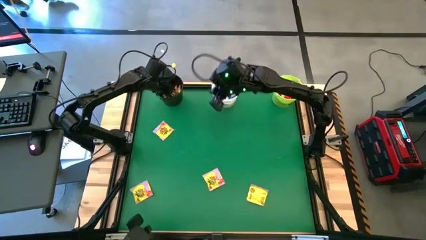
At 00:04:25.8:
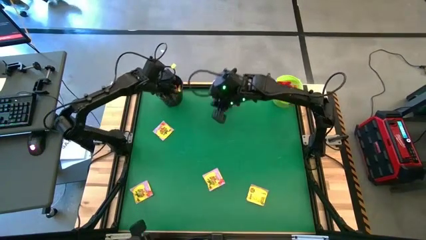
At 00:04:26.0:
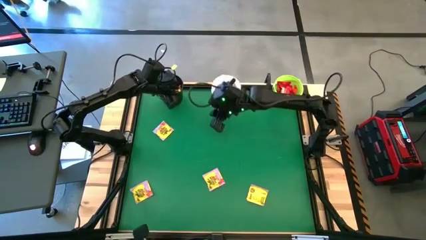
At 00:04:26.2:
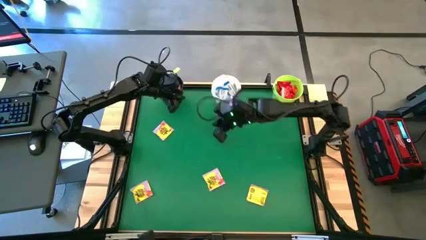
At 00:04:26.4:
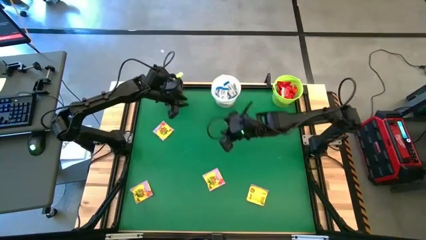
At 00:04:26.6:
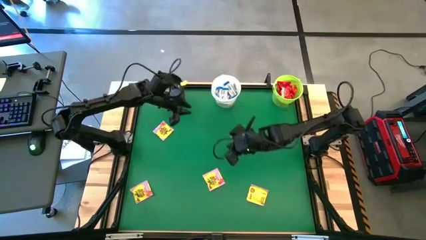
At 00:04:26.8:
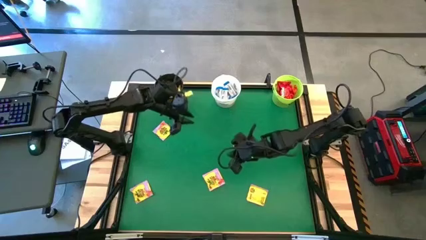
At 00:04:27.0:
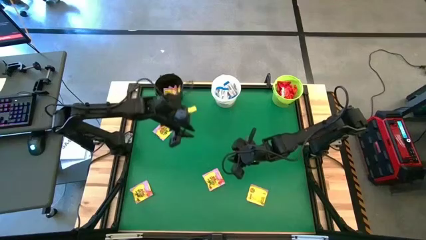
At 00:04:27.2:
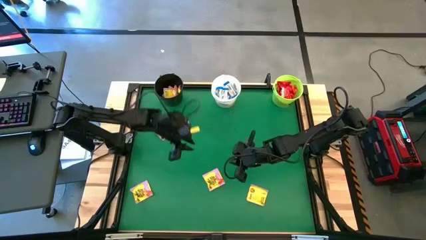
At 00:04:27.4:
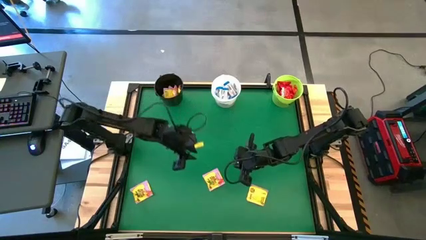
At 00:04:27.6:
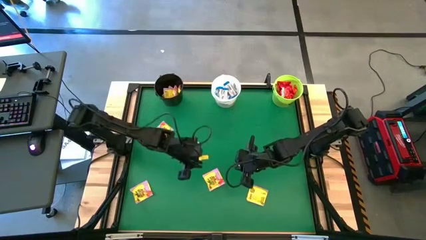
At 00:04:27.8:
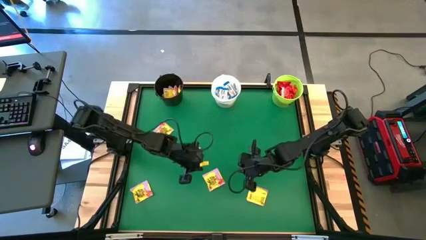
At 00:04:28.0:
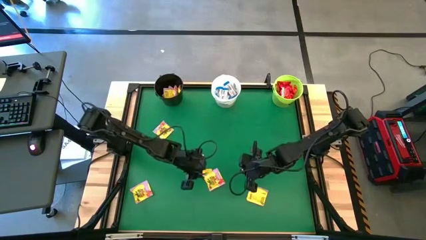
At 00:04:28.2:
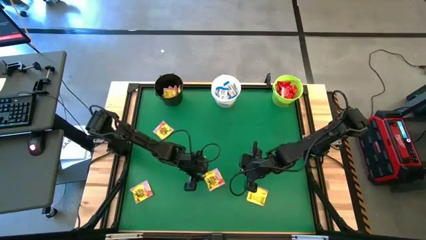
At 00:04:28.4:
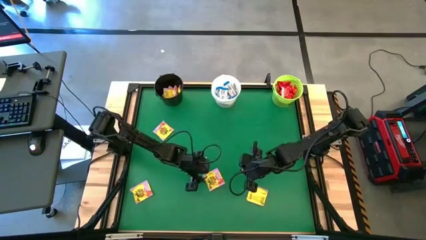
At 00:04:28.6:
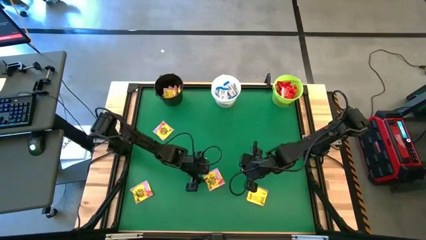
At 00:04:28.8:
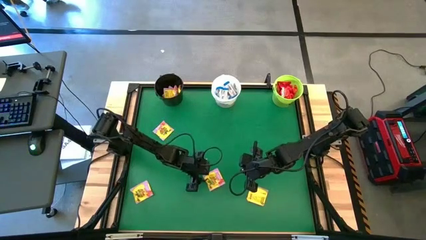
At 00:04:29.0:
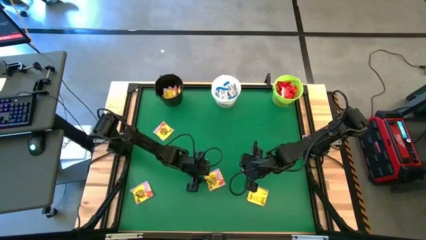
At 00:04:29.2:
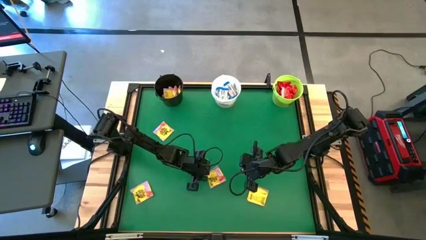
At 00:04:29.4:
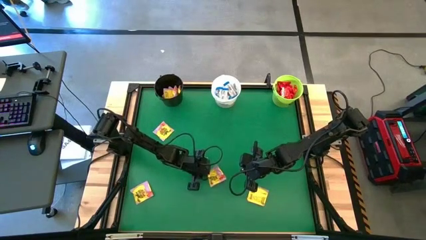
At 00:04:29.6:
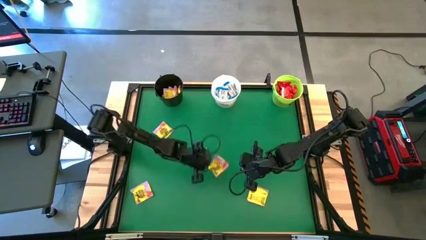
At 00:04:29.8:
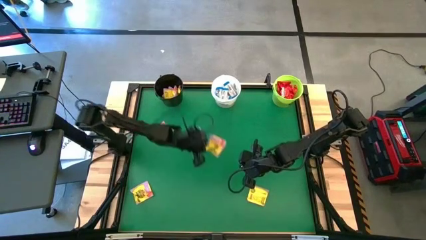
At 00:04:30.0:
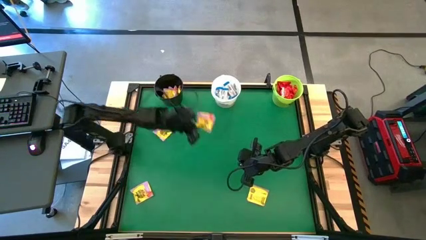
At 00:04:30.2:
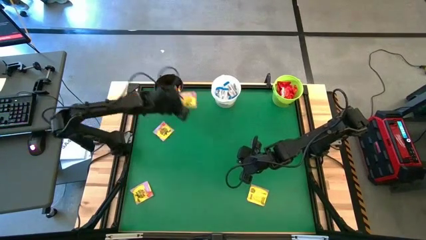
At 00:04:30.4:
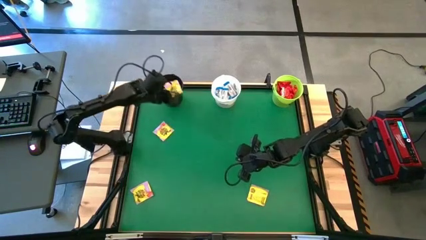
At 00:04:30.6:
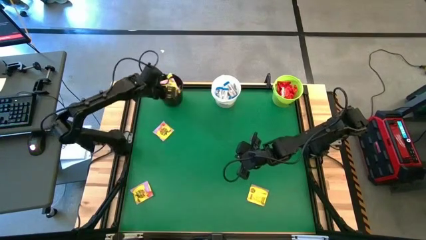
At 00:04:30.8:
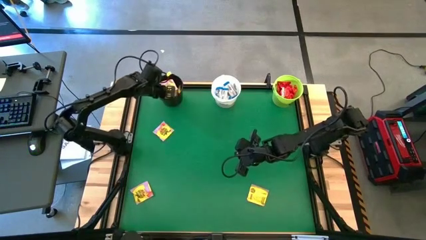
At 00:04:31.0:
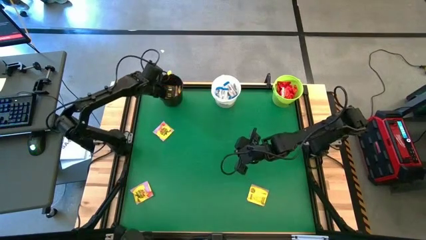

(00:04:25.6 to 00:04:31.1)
Task: Sort candy by brand, put in halloween buckets
Put the yellow candy into the black bucket

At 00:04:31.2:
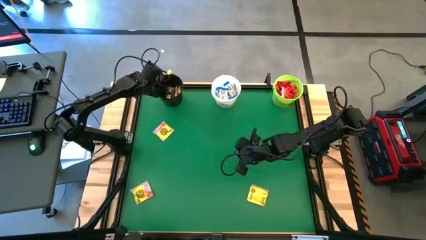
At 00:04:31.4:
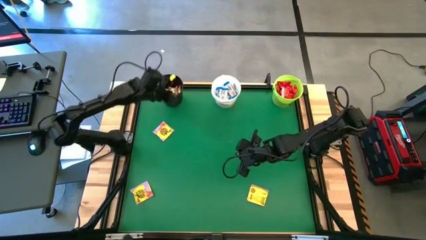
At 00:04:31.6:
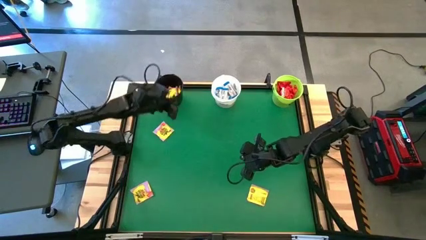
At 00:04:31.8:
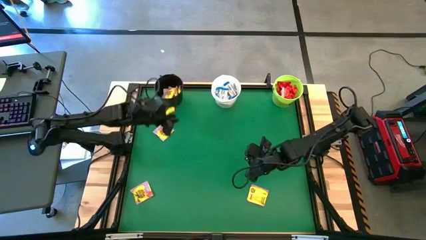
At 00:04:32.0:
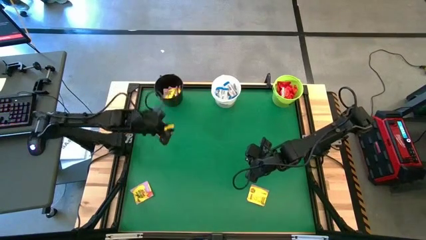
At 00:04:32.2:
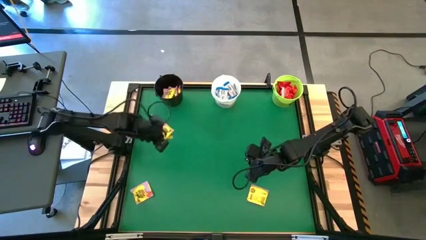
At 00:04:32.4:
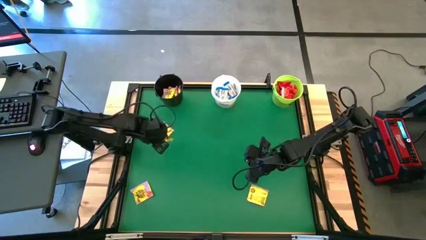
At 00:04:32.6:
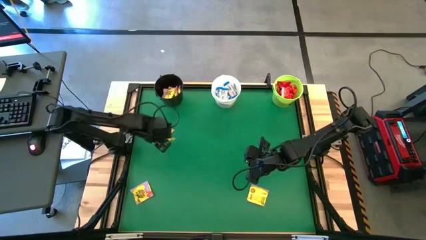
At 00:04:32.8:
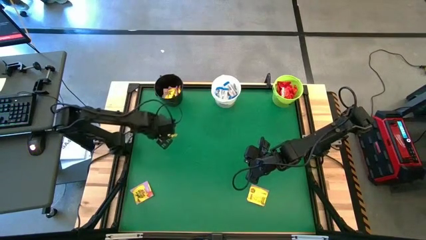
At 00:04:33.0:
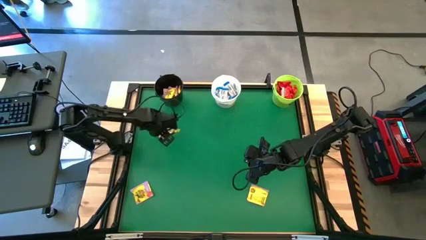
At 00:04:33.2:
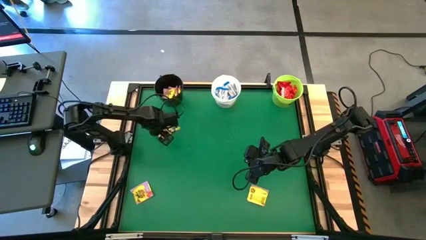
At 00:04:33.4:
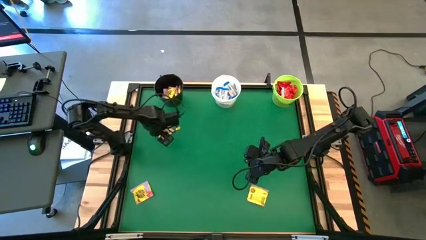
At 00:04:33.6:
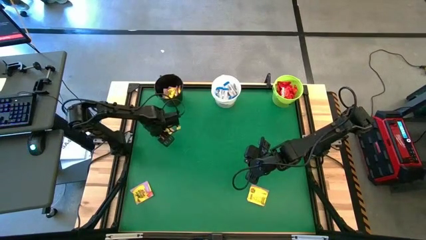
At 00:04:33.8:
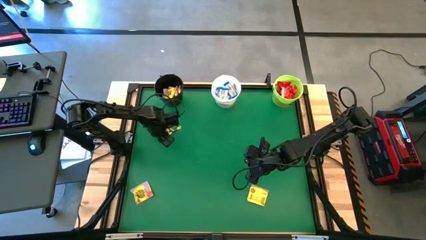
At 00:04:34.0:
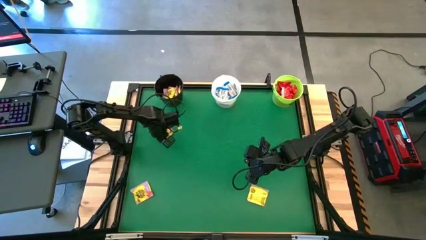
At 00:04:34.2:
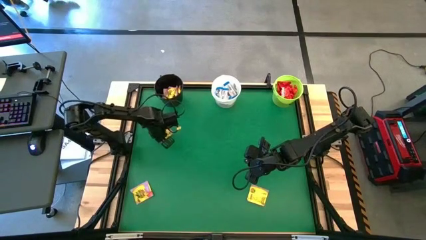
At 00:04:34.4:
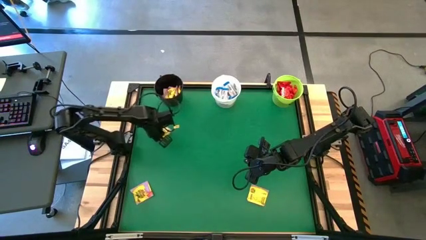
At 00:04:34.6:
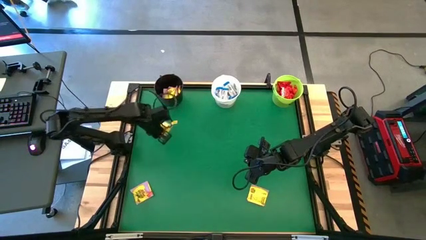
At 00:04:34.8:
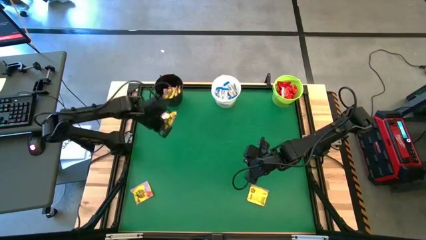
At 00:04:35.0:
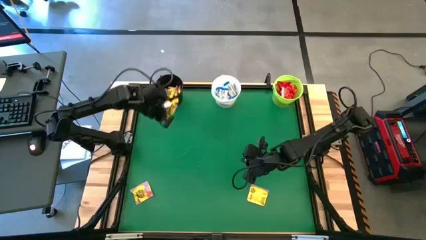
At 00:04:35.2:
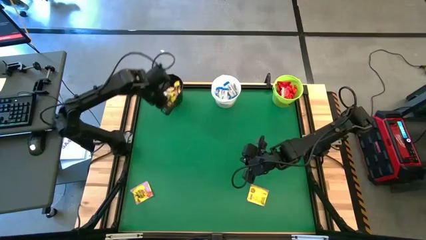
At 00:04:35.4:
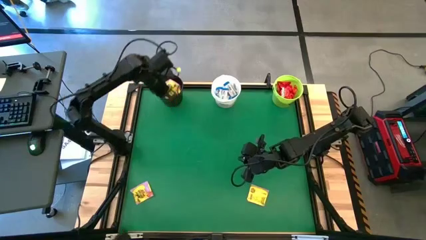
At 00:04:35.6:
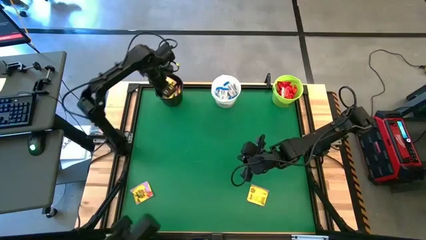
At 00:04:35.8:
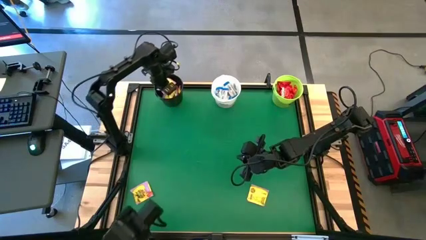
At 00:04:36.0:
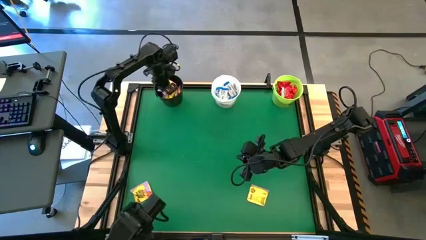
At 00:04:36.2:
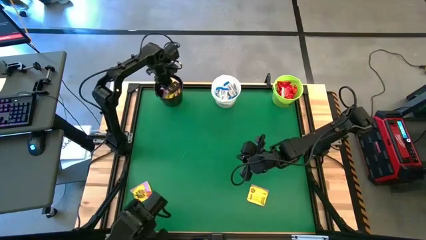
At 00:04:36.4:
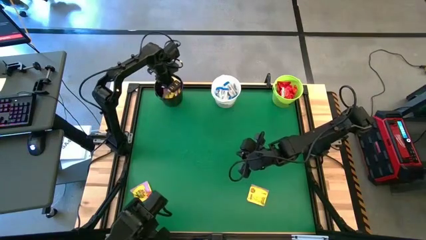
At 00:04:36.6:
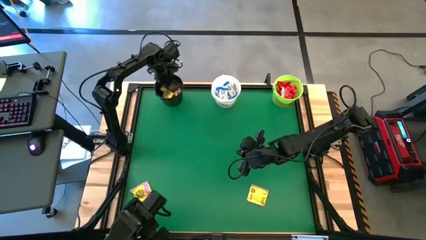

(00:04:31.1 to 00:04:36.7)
Put the yellow candy into the black bucket

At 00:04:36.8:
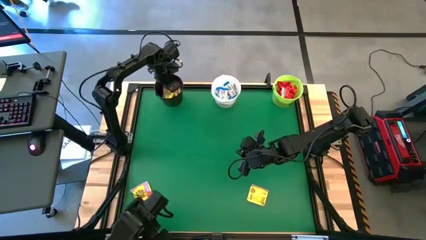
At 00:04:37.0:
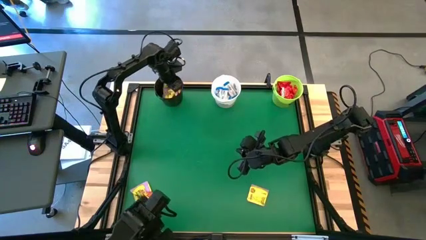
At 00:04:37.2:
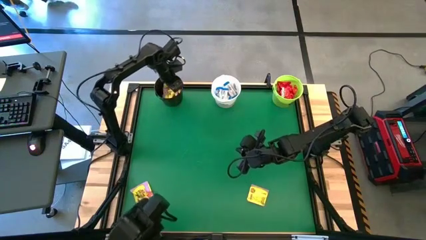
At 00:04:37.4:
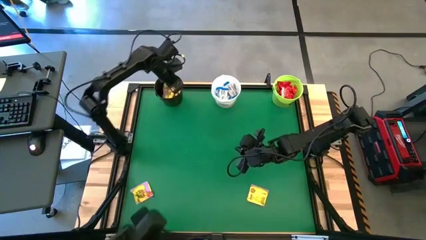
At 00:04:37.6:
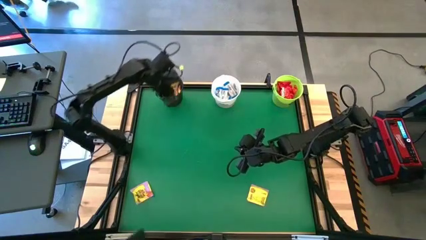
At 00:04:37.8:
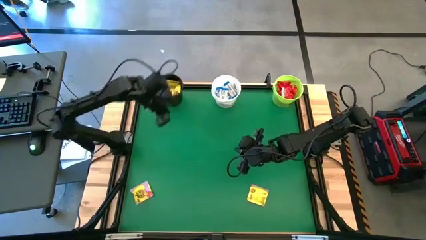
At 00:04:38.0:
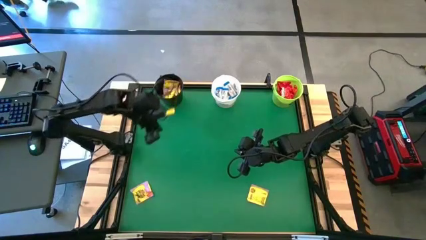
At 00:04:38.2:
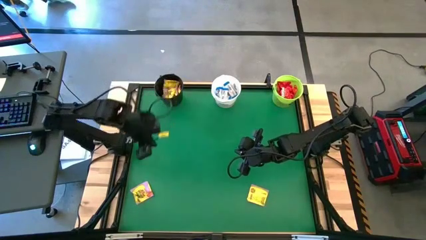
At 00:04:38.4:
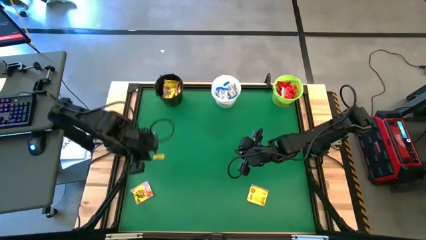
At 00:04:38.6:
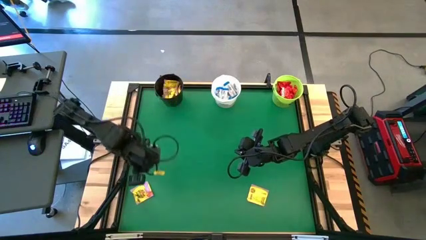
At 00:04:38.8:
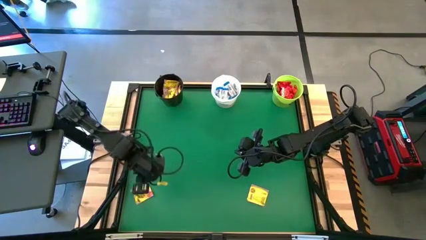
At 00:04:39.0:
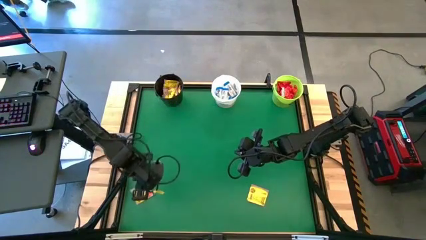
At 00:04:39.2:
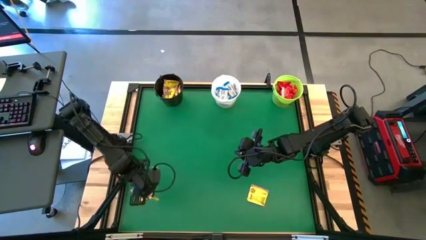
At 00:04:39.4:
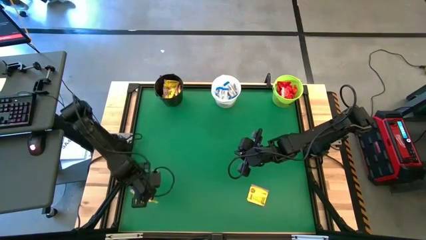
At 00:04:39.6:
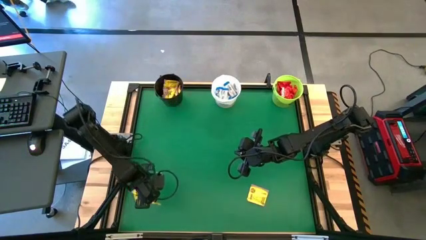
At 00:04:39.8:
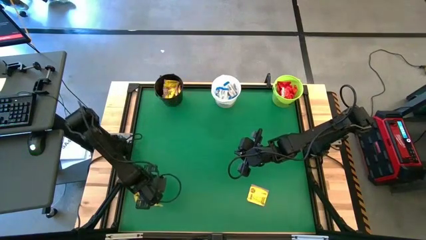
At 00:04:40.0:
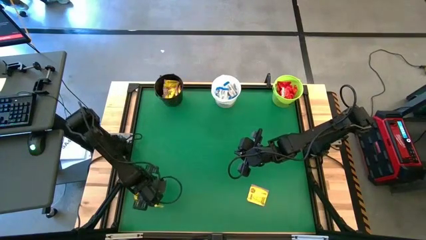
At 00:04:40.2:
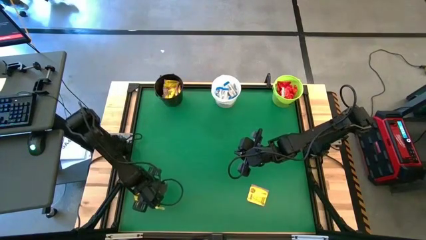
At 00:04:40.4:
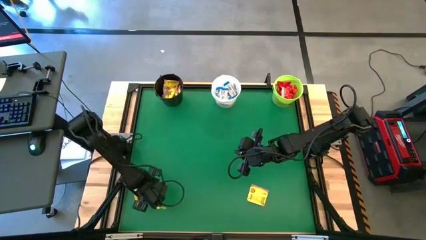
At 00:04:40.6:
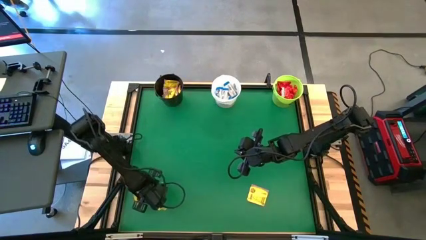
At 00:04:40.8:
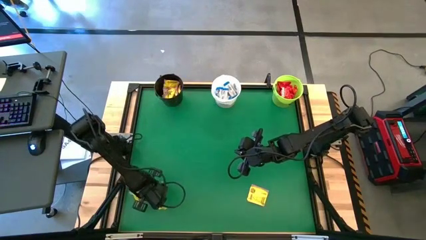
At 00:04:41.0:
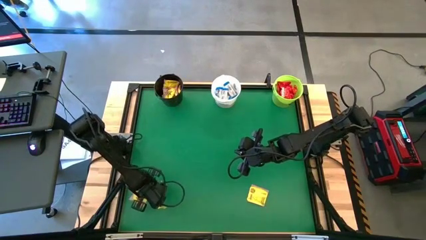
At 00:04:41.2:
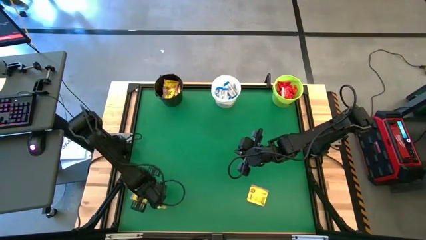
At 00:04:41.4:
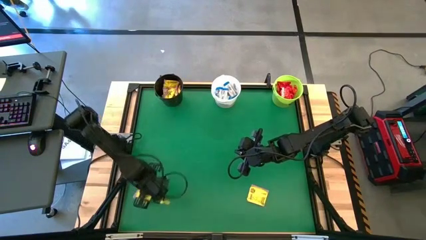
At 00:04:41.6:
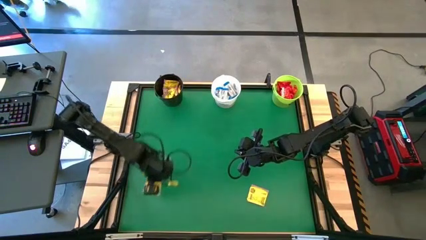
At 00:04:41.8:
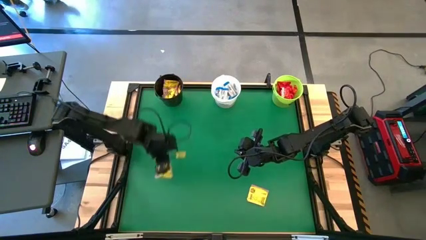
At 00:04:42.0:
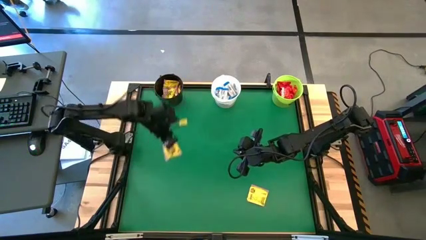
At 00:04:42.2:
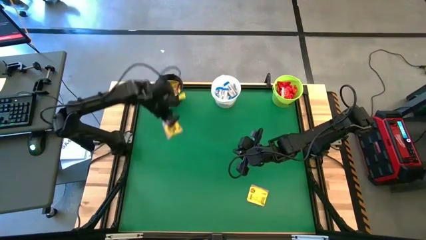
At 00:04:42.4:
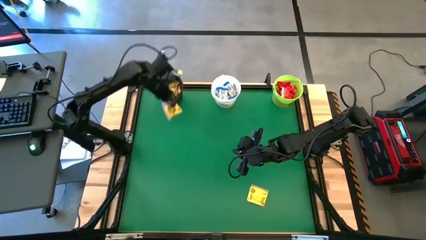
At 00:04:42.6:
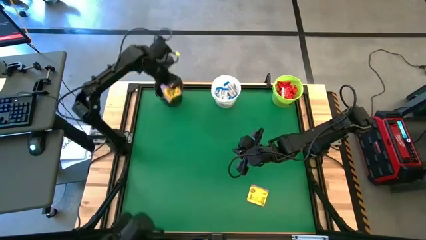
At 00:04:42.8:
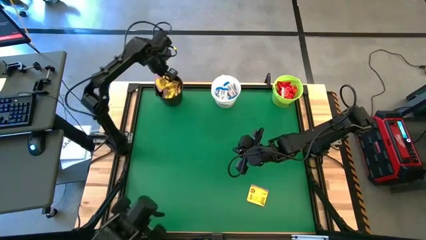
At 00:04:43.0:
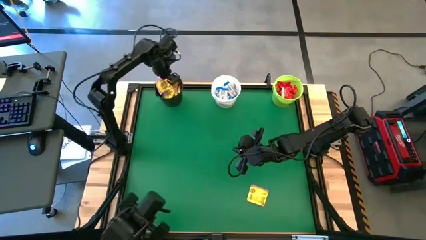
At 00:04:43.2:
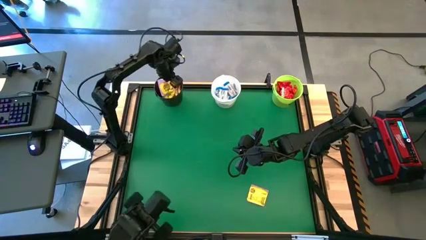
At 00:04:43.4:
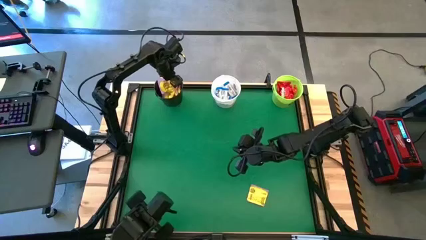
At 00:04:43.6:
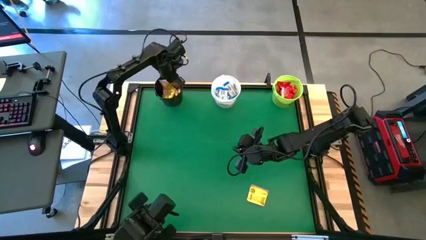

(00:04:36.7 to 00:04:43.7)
Put the yellow candy into the black bucket
